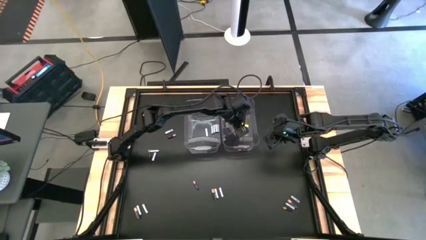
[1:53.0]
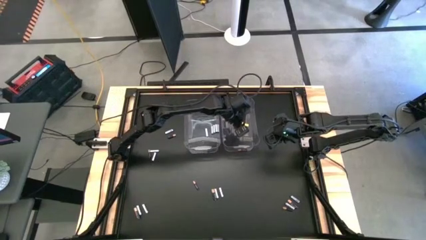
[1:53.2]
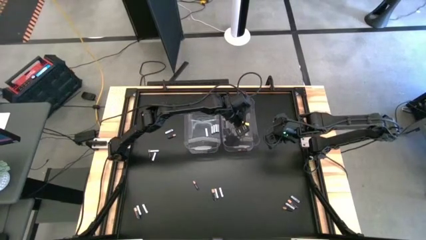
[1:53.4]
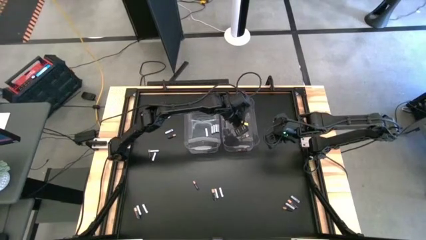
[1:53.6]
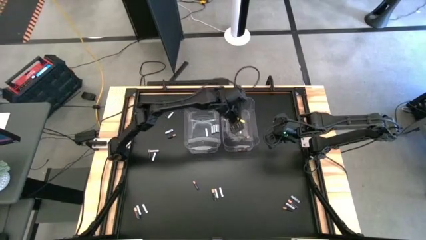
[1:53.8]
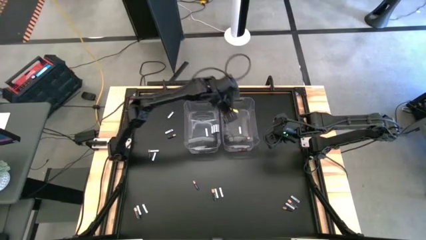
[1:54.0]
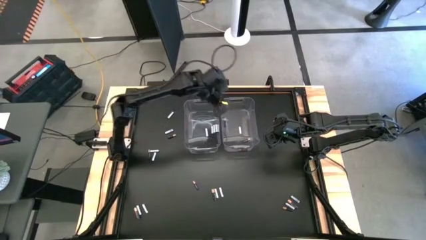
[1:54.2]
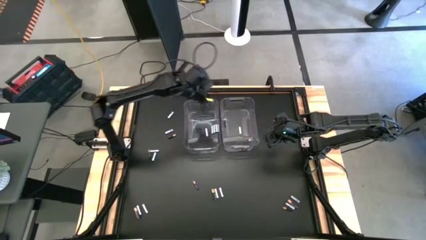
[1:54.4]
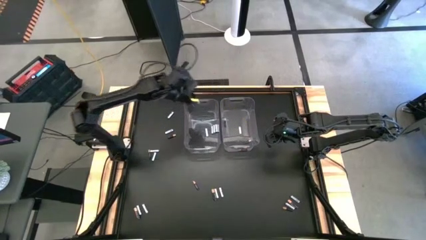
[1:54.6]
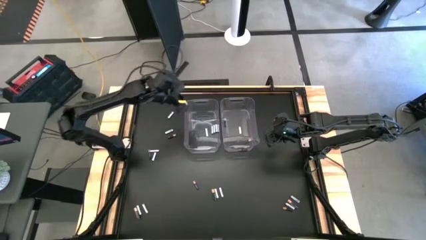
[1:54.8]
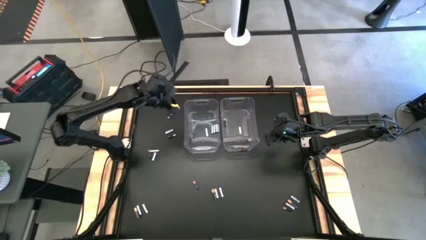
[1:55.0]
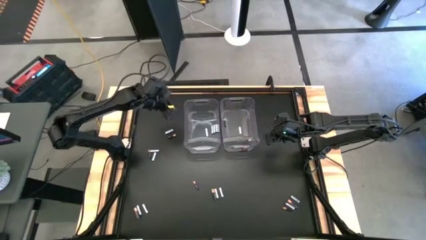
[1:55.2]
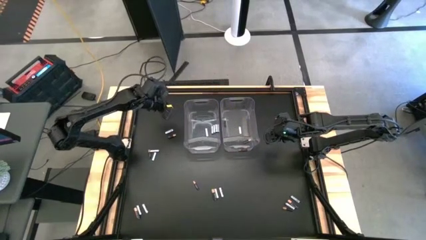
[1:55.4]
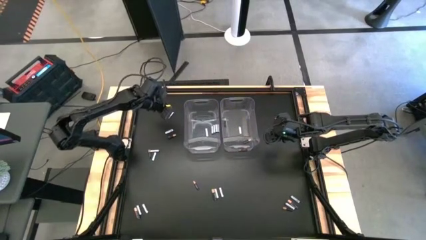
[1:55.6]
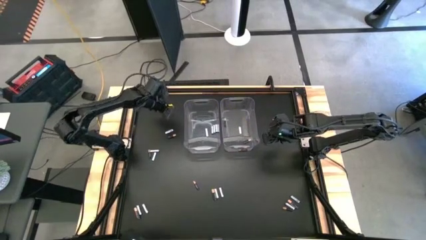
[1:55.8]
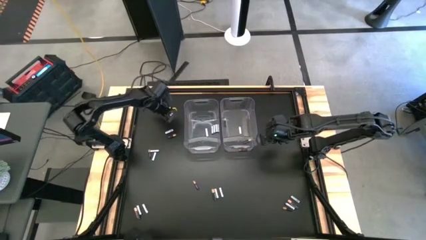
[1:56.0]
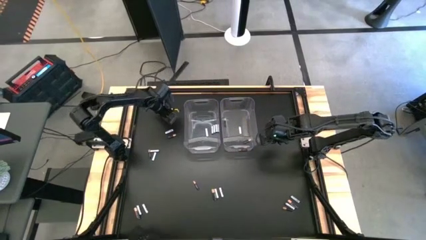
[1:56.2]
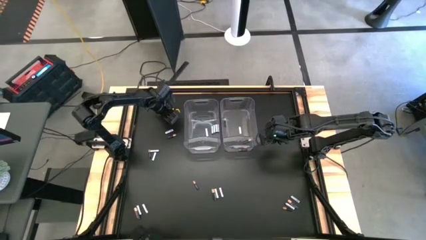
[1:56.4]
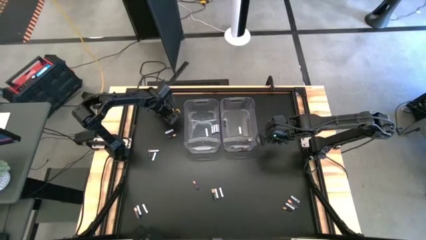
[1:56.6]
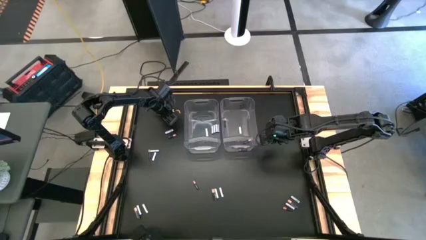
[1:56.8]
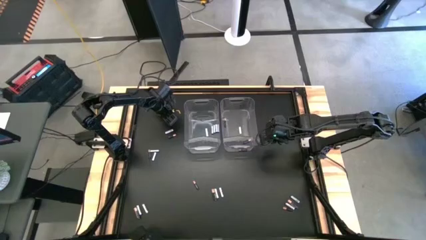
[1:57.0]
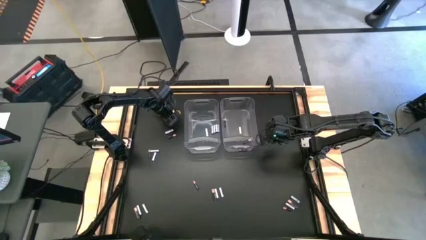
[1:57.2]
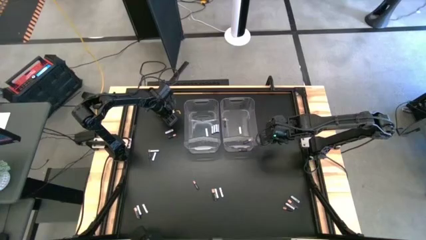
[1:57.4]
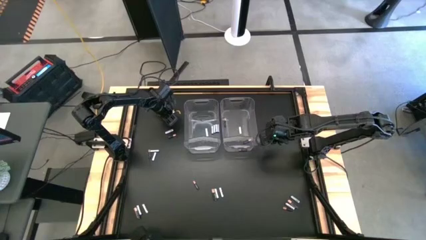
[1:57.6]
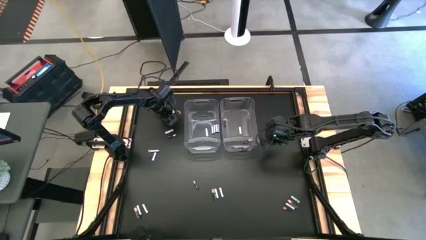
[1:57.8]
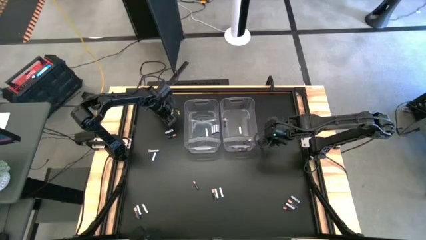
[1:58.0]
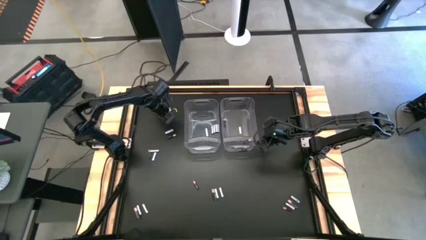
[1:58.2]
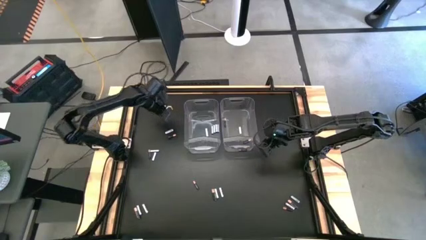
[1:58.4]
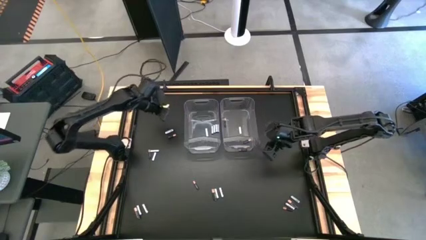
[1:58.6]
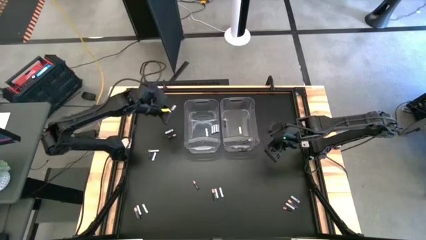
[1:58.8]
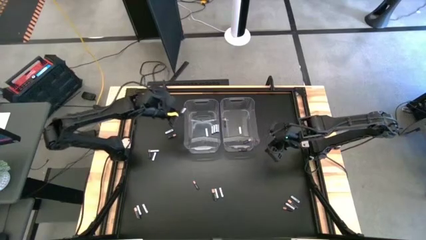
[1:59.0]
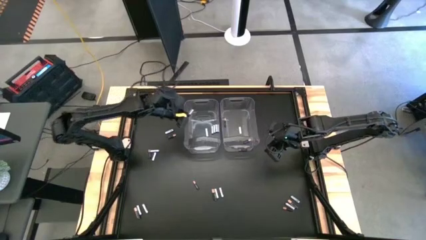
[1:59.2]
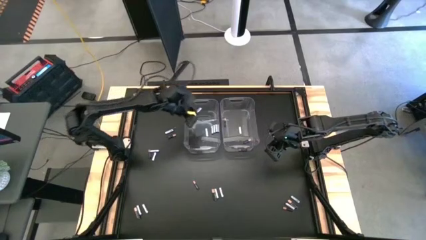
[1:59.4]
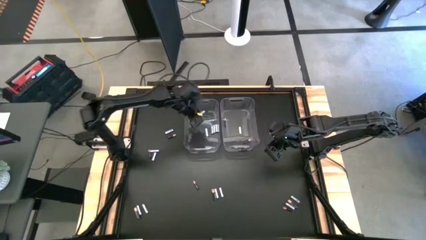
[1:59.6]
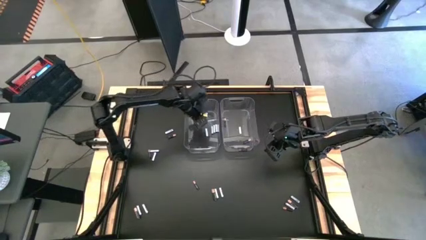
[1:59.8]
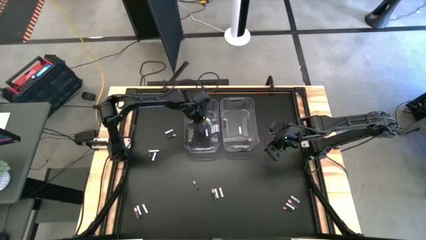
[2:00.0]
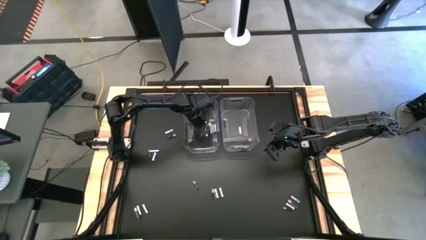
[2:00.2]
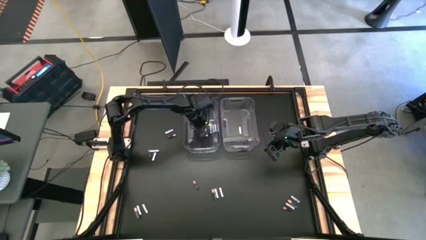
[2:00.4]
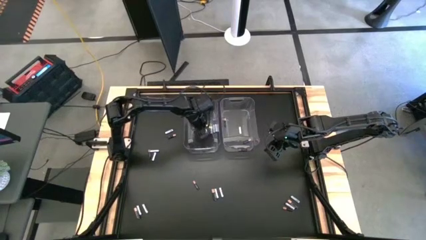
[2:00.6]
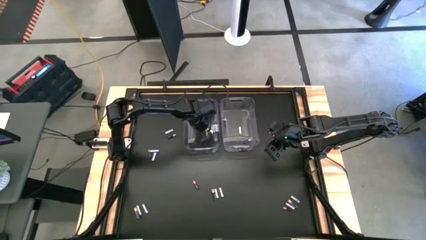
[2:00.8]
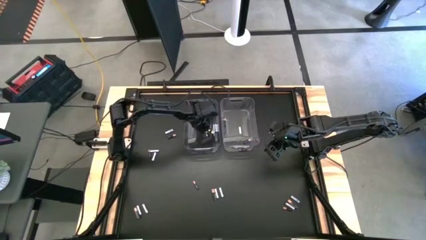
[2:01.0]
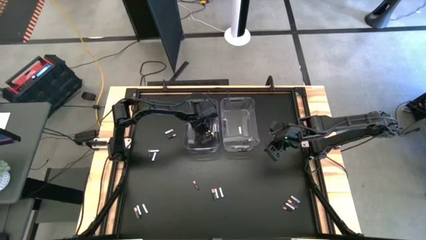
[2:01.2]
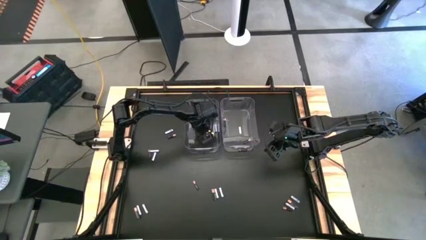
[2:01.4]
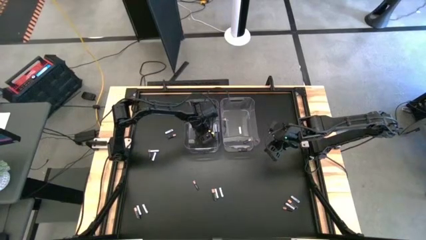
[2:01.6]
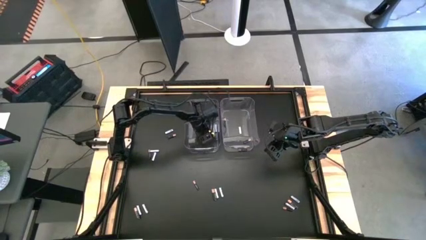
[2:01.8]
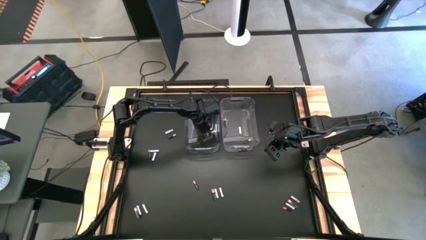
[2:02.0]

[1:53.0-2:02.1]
Task: Sort batteries
Put the white battery into the left transparent bin

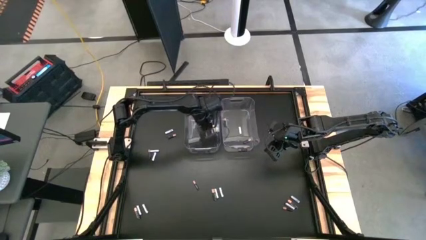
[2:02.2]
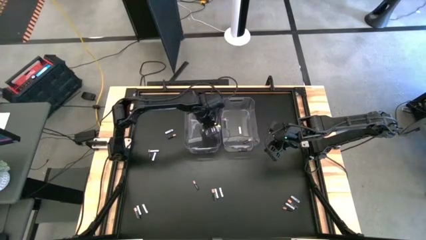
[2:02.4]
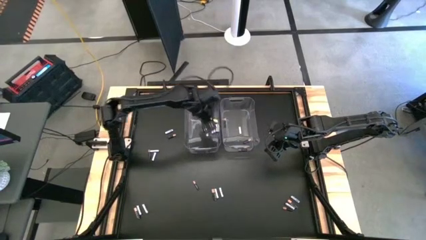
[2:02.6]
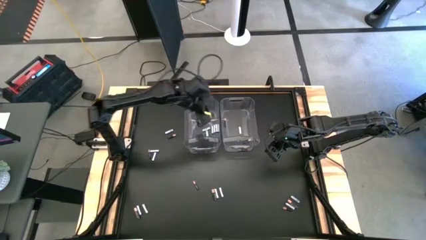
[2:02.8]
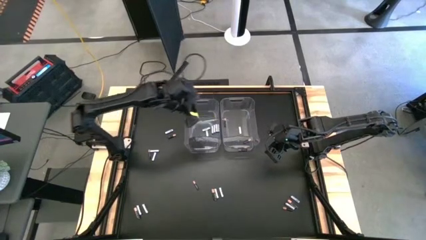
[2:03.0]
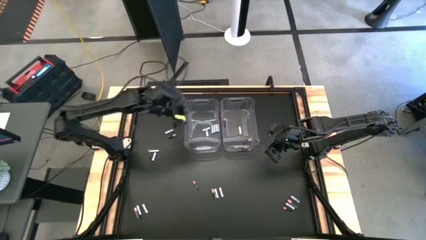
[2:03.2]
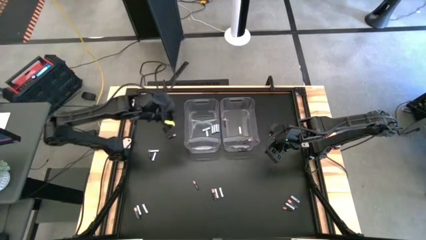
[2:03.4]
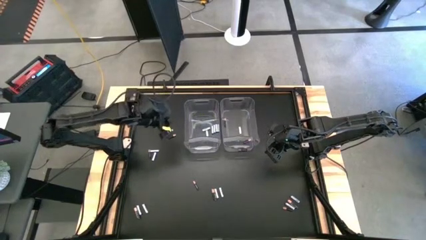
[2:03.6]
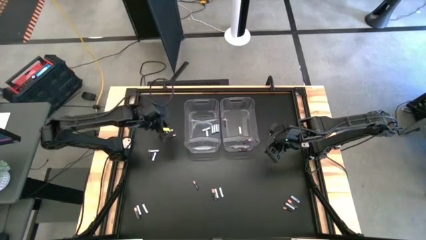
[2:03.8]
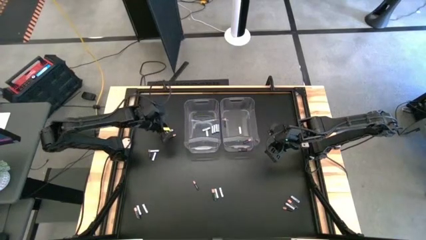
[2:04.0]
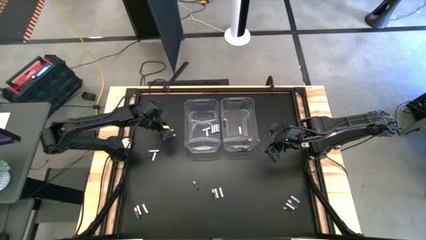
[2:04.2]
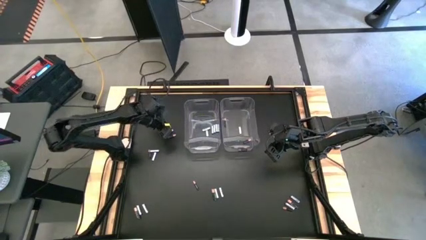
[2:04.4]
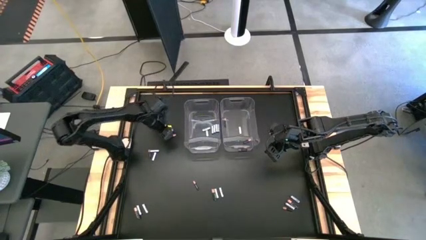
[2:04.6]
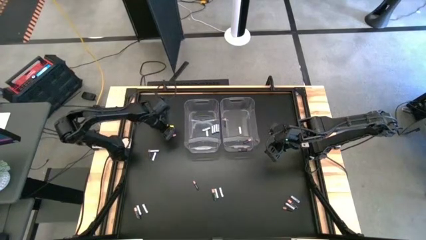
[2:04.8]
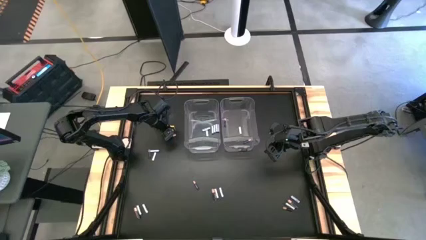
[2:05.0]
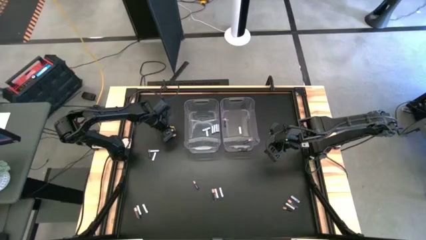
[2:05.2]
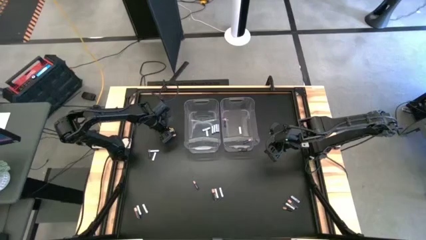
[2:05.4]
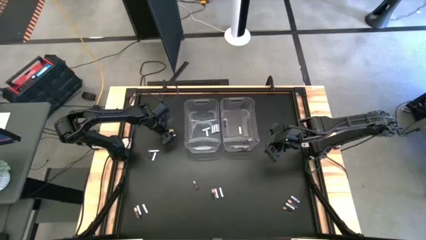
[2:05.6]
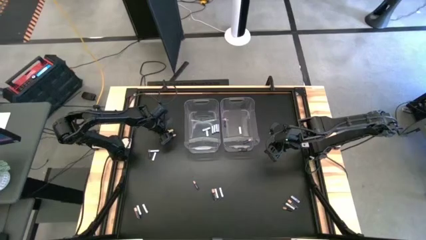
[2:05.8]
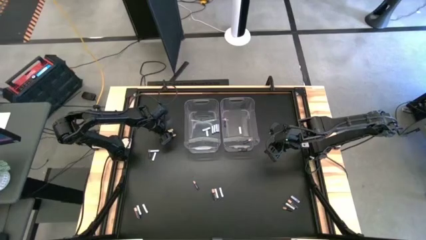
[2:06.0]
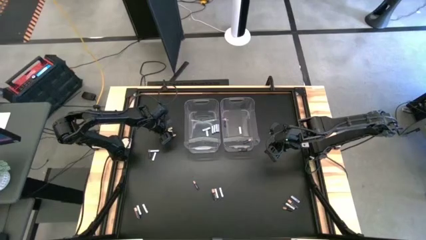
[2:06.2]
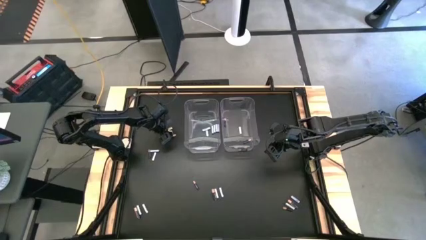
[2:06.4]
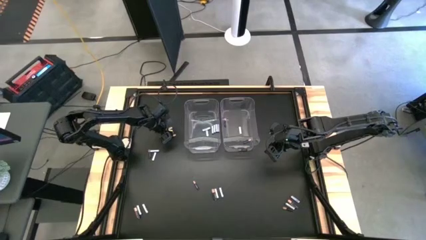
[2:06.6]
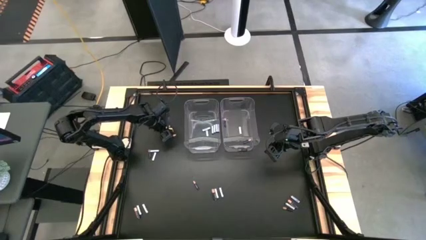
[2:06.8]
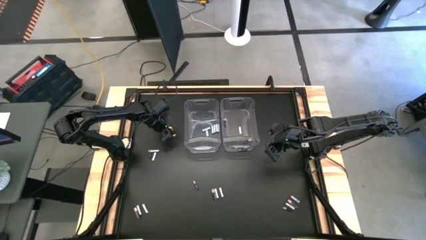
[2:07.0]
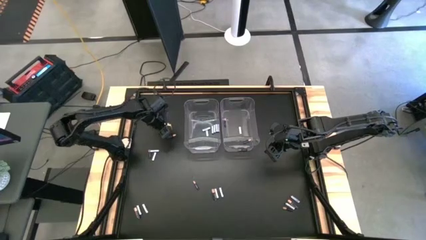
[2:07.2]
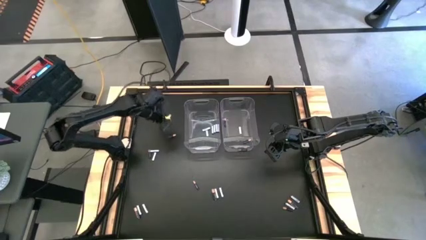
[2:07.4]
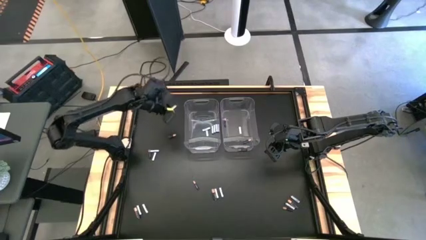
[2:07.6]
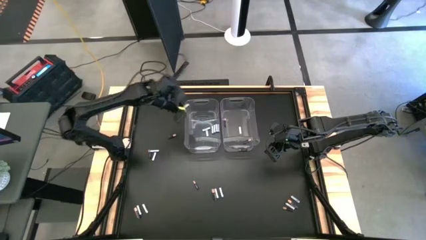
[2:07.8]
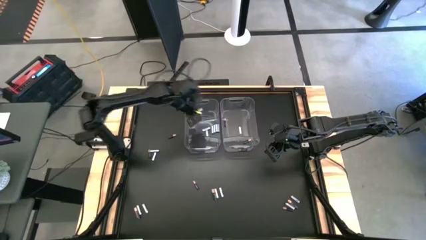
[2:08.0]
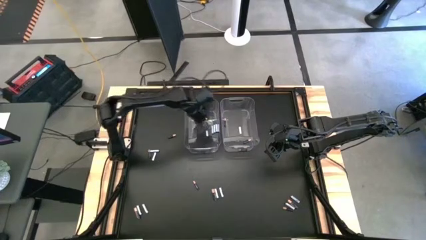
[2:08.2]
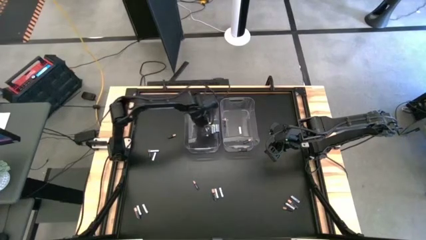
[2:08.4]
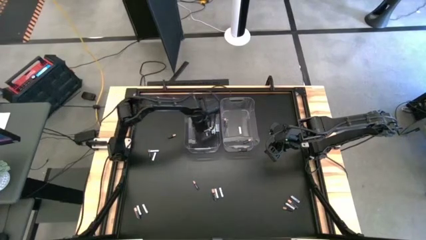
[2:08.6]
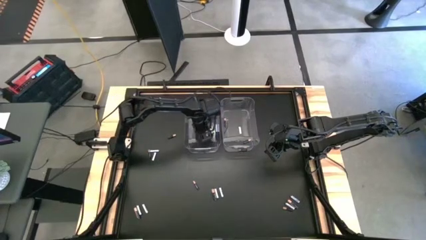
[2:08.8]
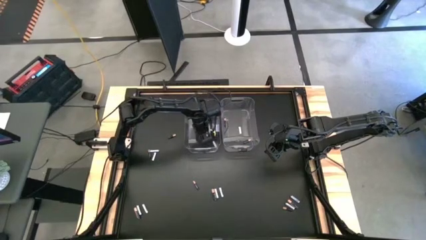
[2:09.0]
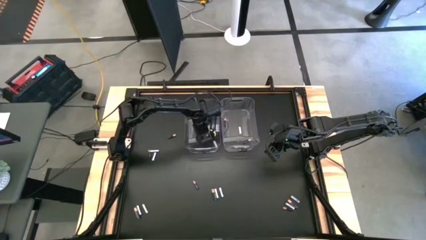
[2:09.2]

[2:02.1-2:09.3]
Put the white battery into the left transparent bin
